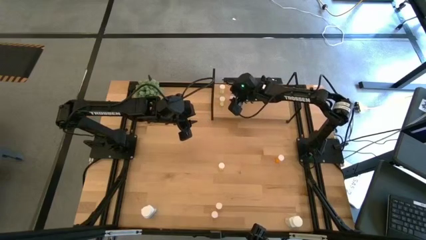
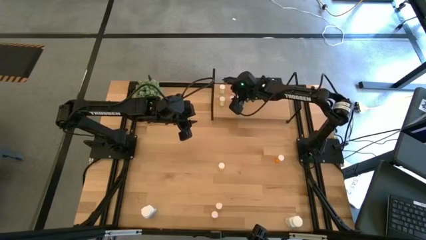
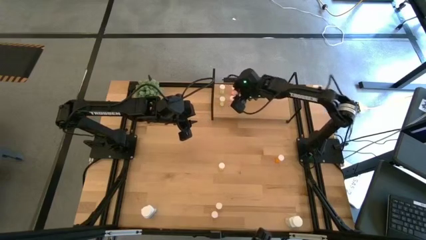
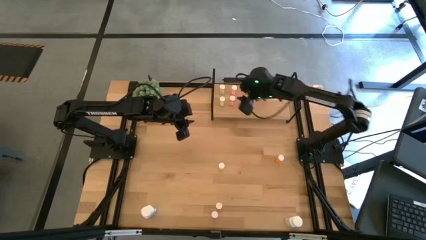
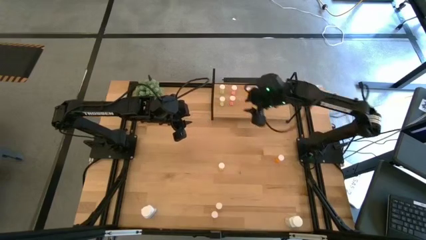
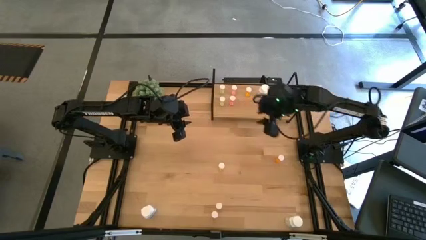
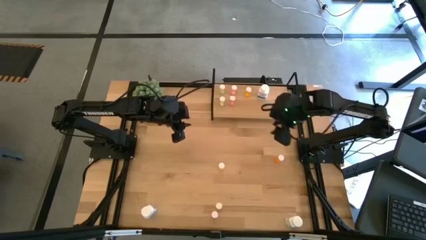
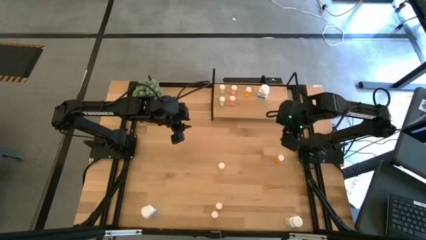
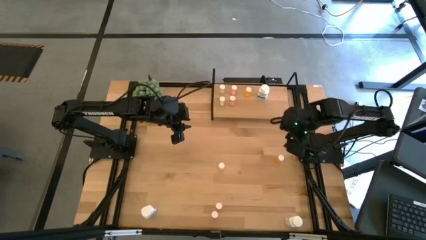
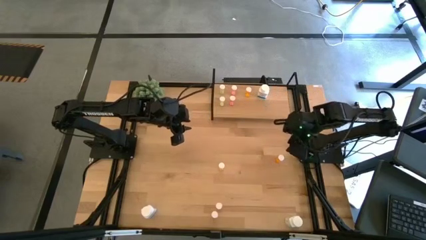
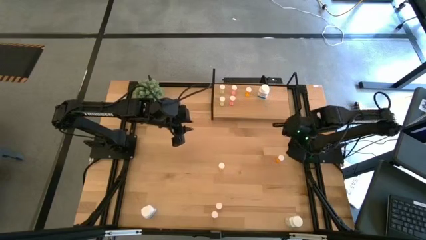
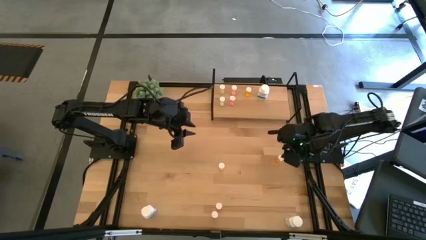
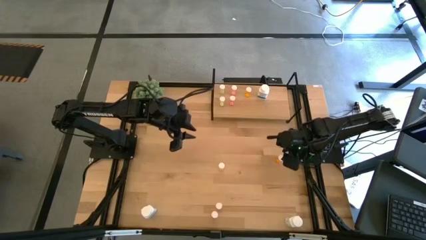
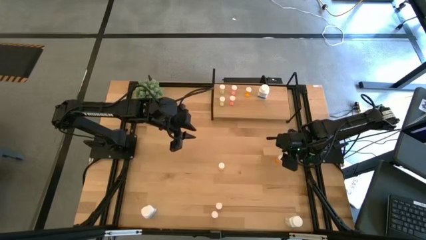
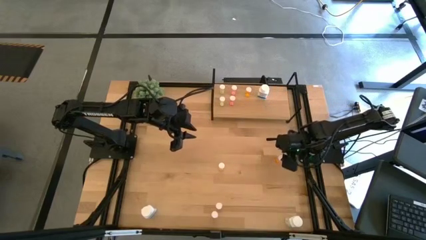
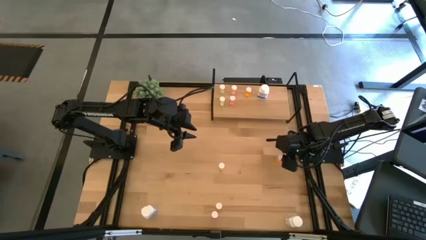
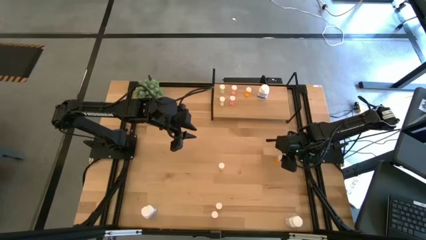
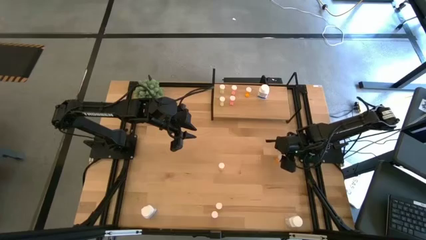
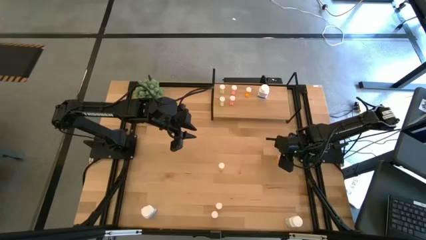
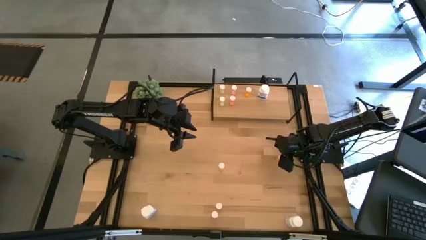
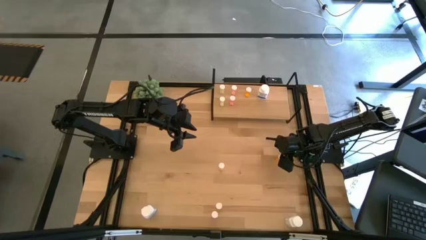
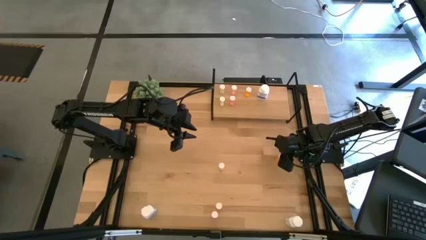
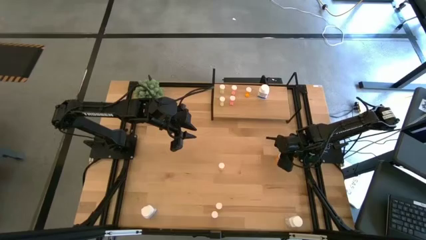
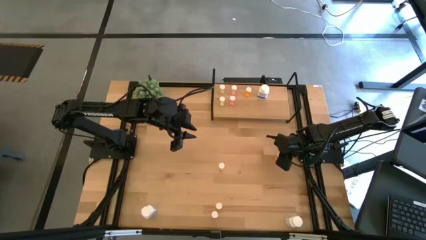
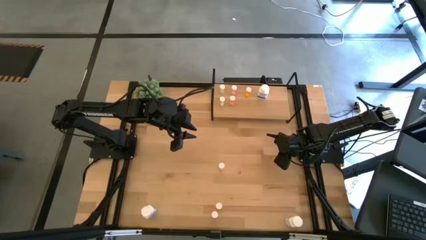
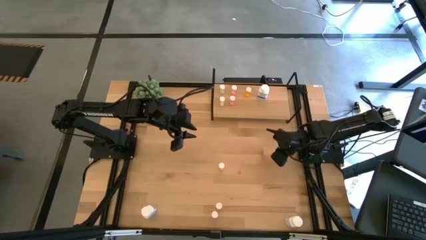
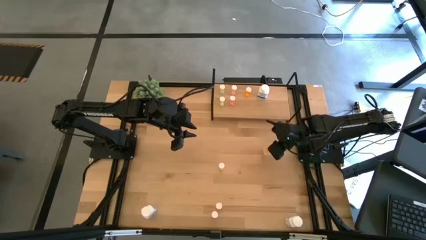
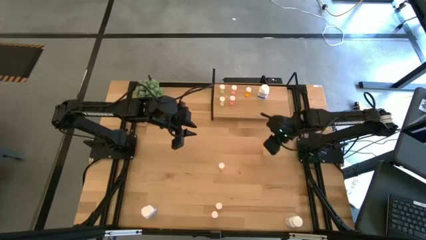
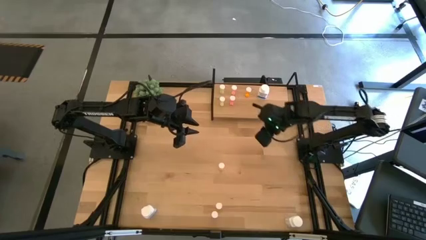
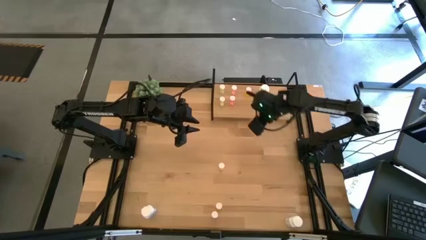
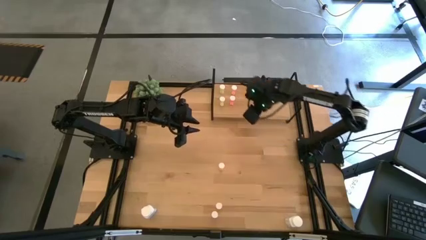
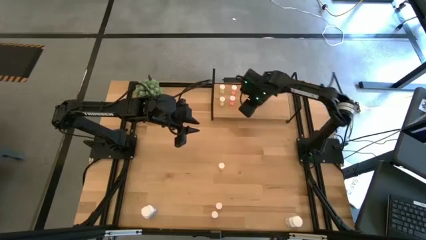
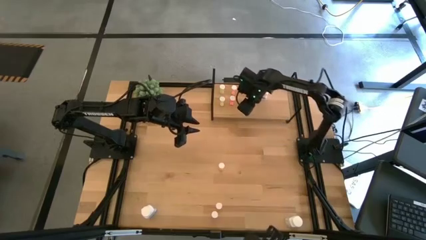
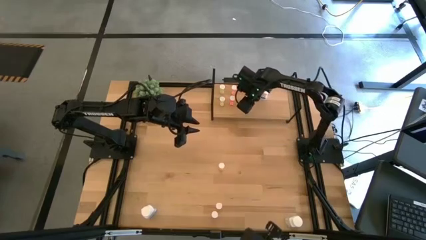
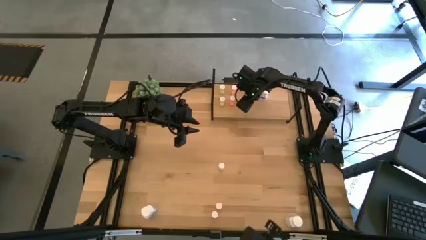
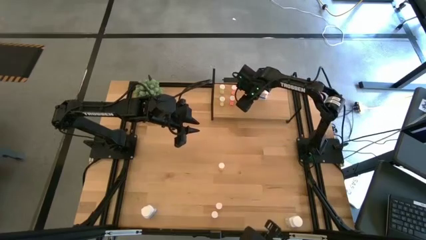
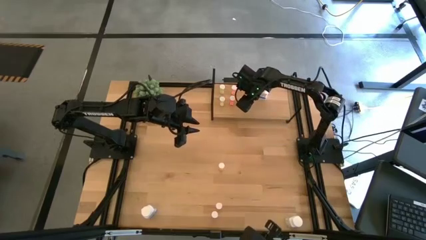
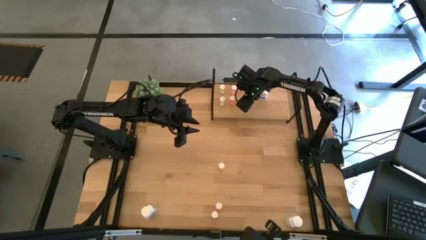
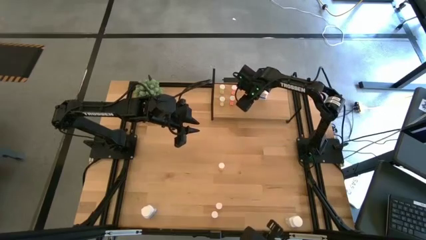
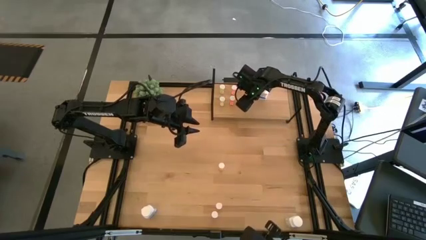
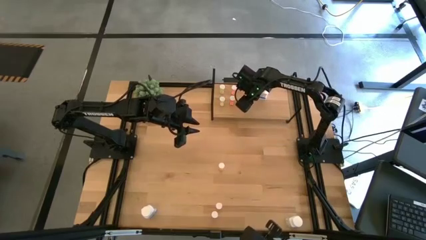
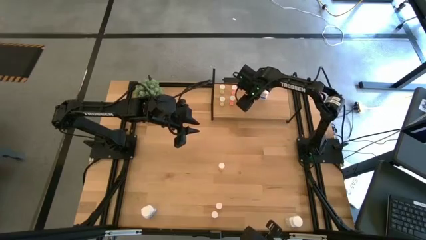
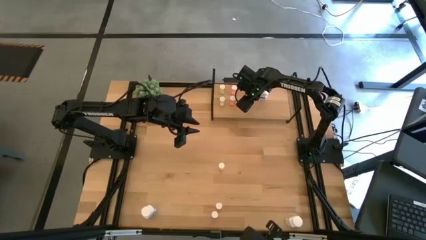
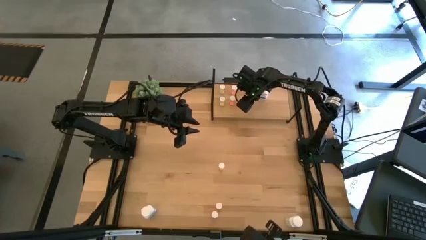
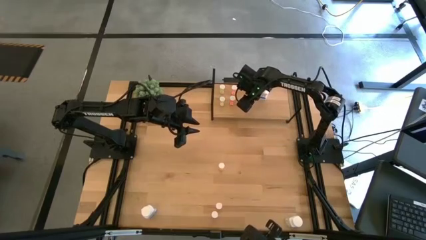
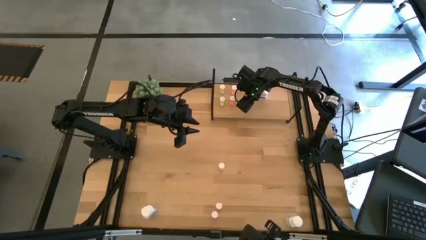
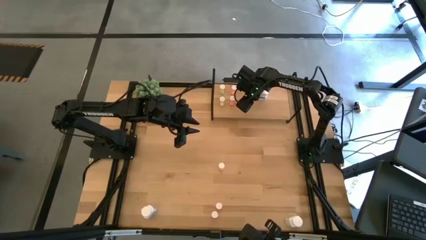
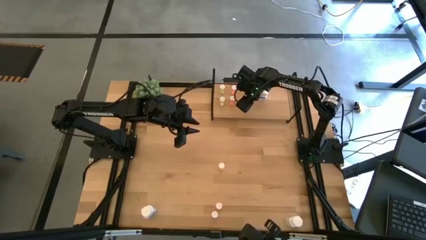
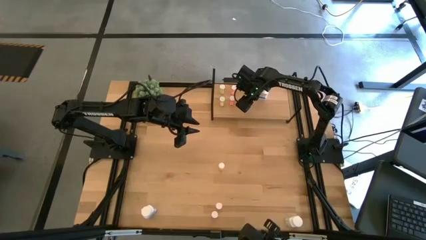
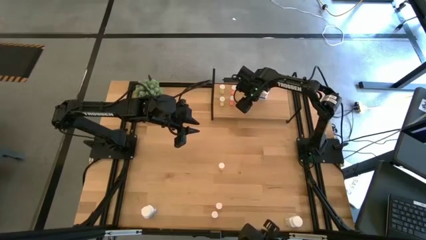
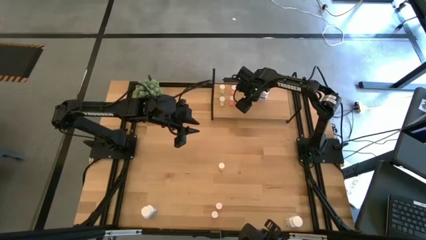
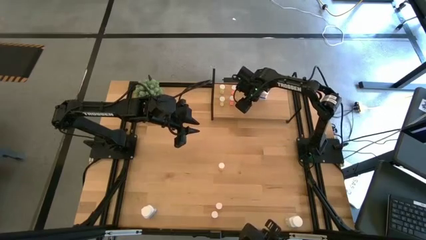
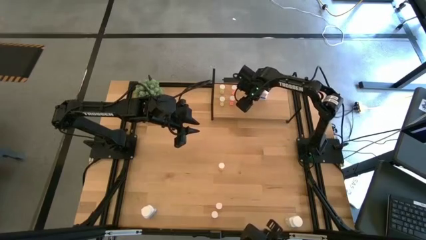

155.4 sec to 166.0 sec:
Task: Pick and place medicine bottles onto shelf by color
Put the top orange pill bottle on the shelf aligned with the other orange pill bottle

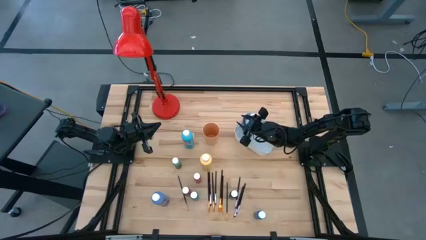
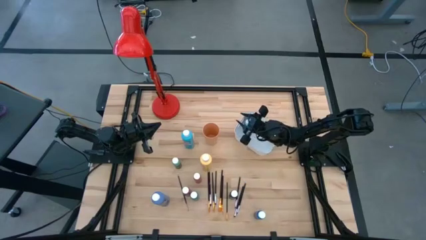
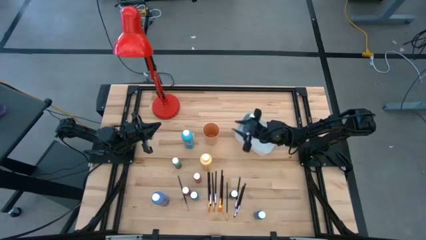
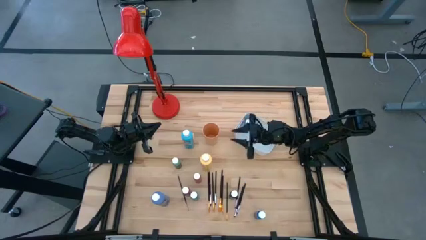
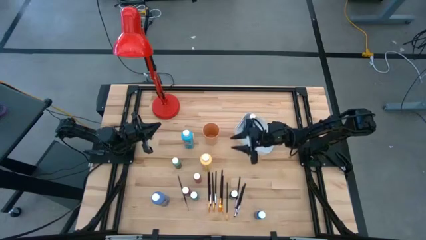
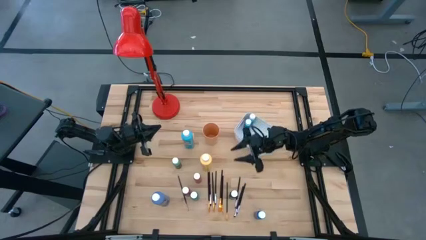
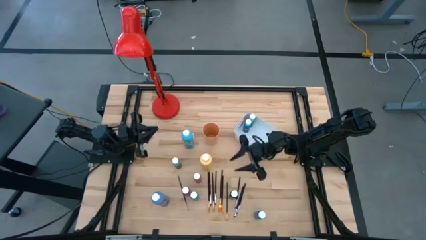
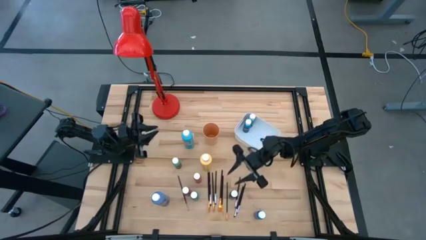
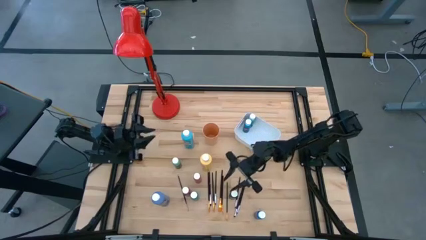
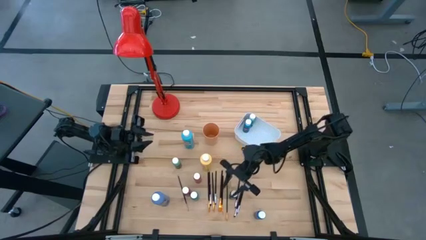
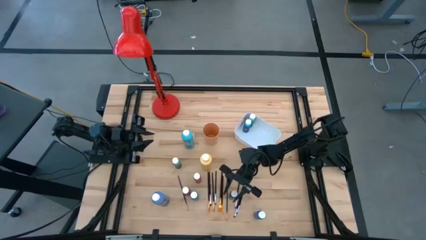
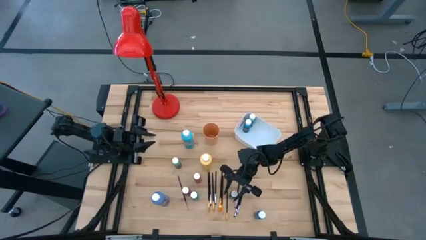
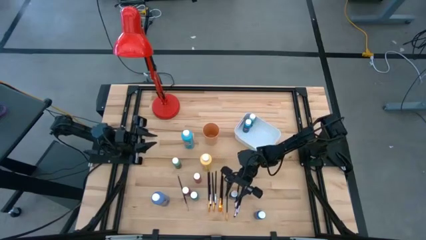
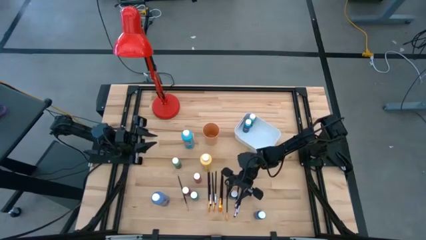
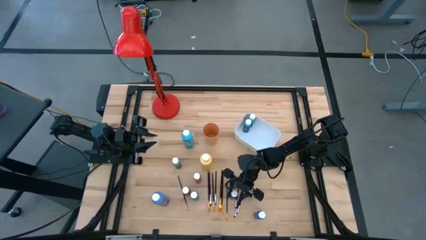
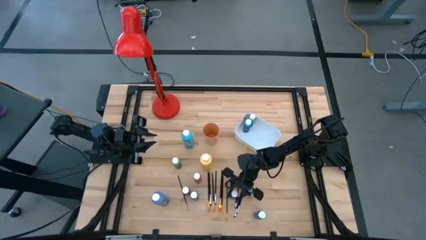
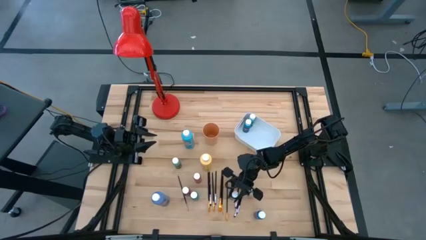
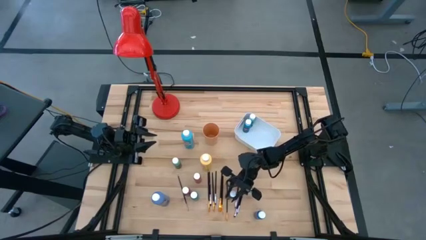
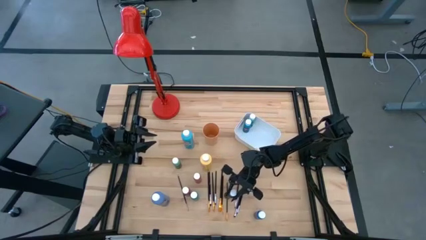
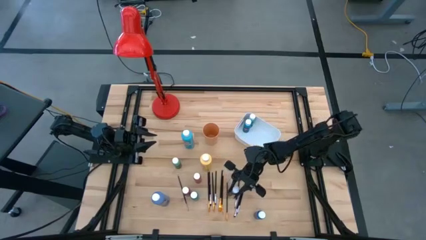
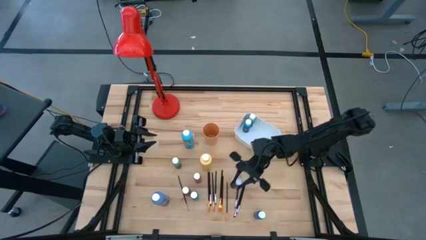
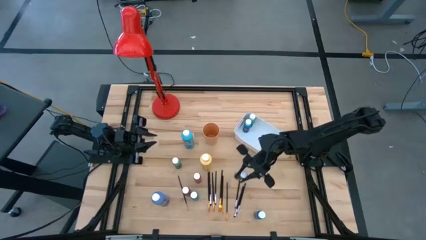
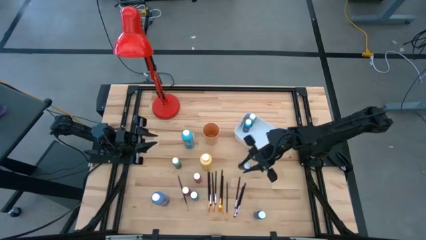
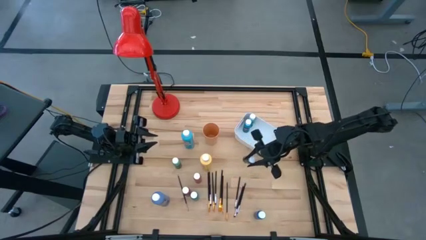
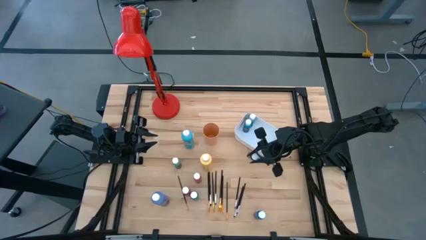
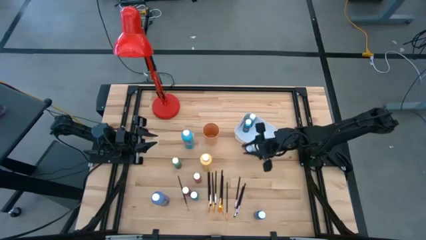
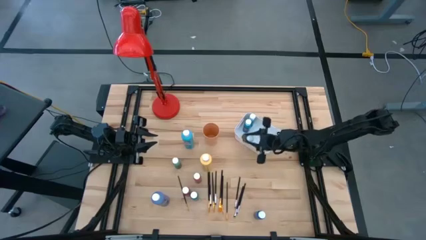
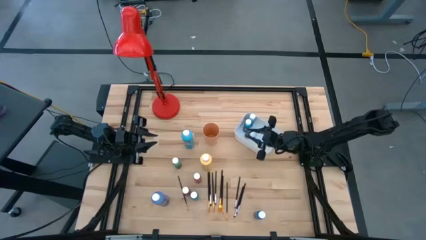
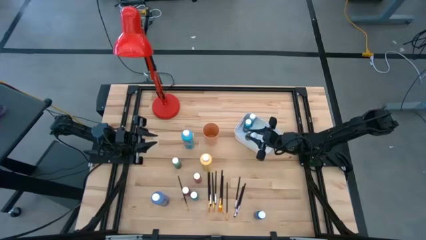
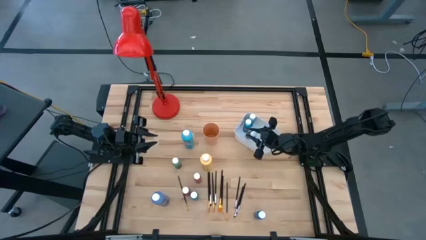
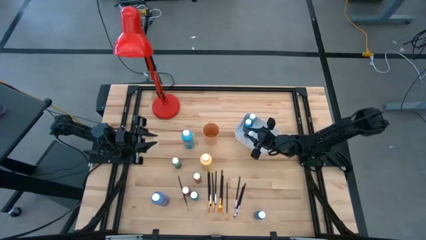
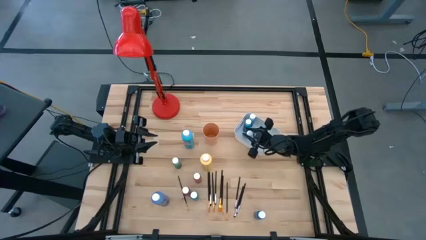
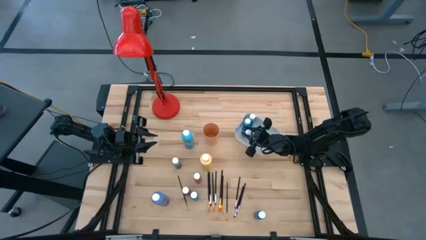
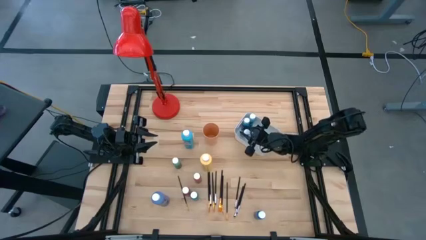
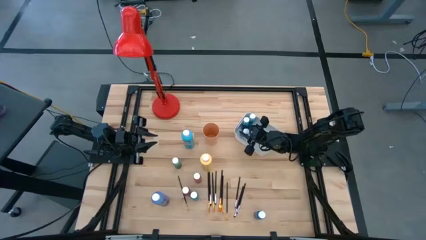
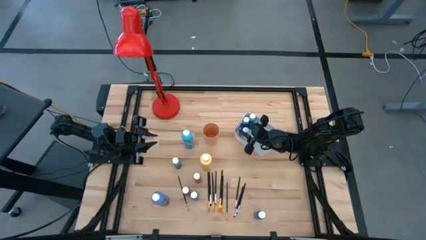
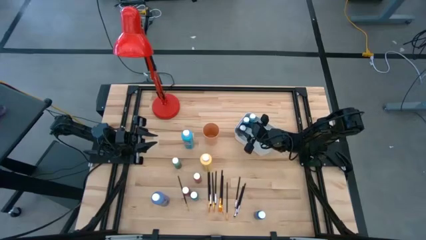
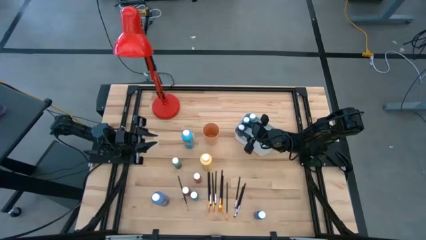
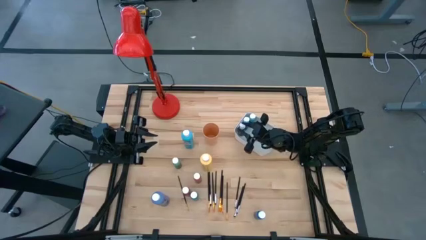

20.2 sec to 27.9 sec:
Task: Pick & Place Paint Supplies
Put the black paint bottle into the white bin
